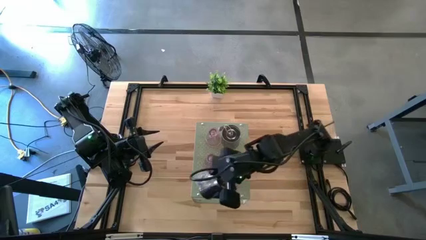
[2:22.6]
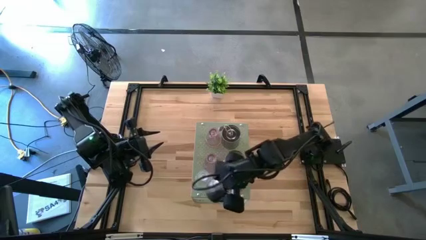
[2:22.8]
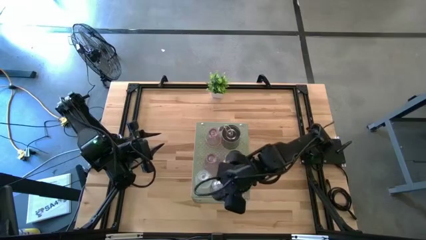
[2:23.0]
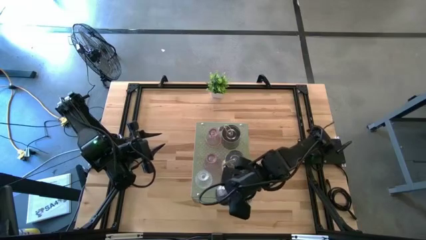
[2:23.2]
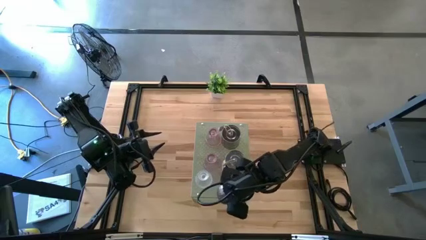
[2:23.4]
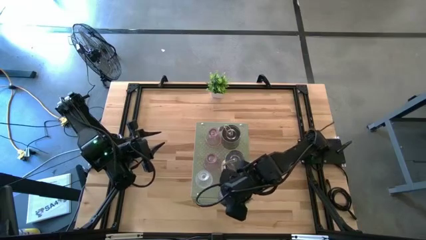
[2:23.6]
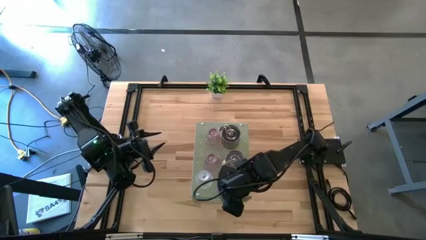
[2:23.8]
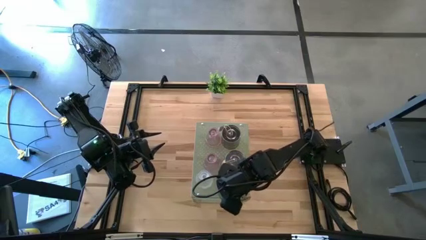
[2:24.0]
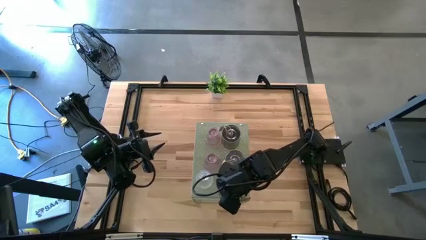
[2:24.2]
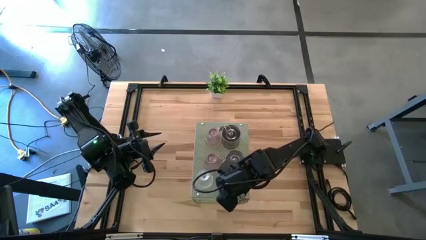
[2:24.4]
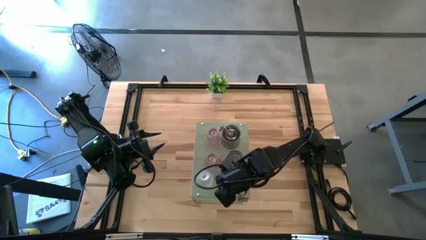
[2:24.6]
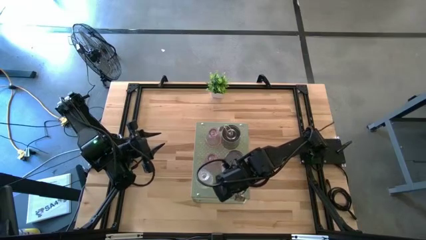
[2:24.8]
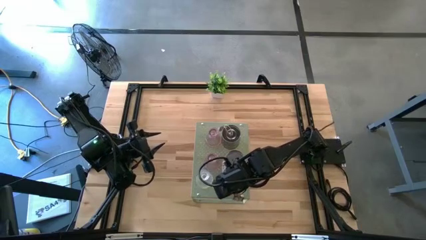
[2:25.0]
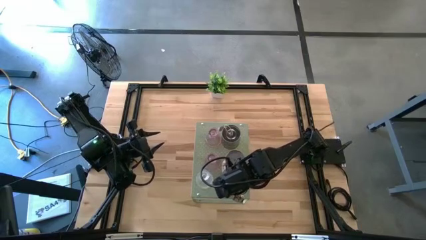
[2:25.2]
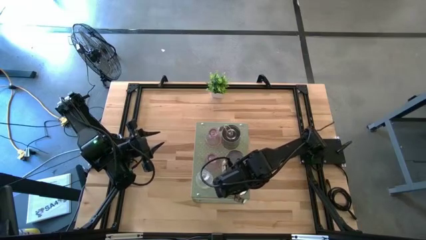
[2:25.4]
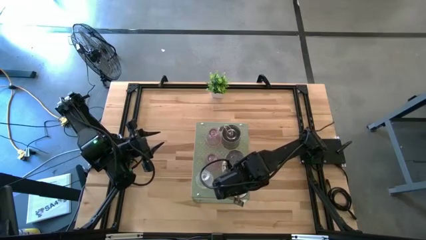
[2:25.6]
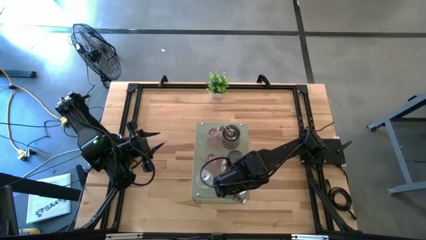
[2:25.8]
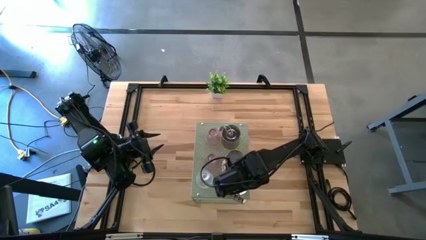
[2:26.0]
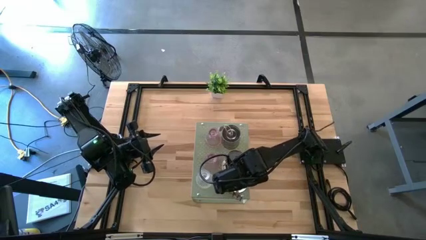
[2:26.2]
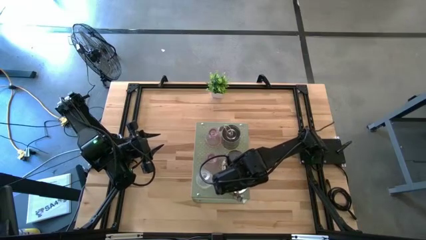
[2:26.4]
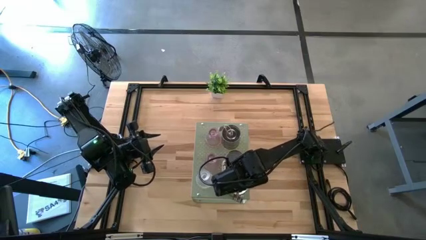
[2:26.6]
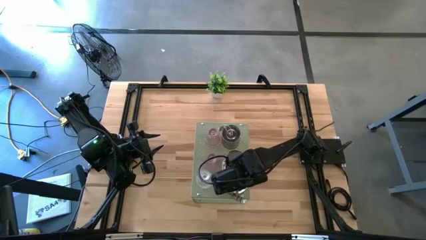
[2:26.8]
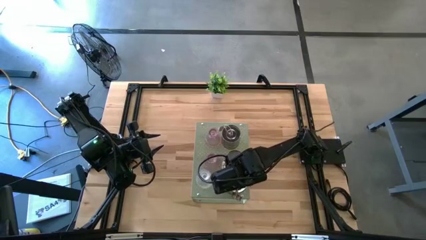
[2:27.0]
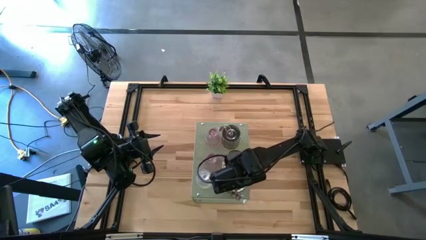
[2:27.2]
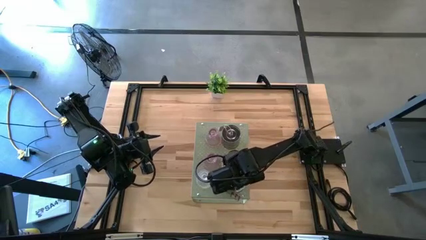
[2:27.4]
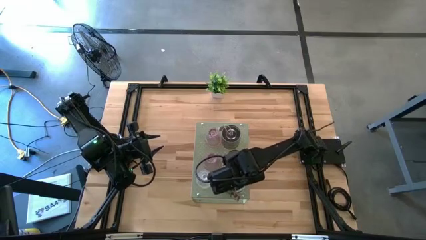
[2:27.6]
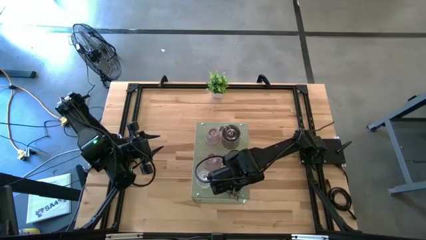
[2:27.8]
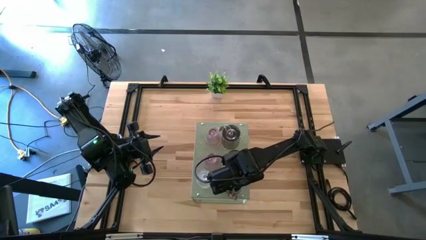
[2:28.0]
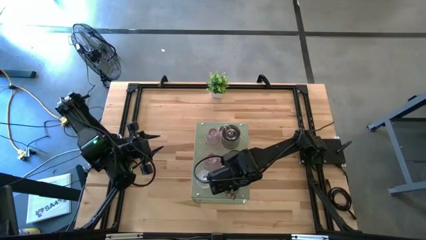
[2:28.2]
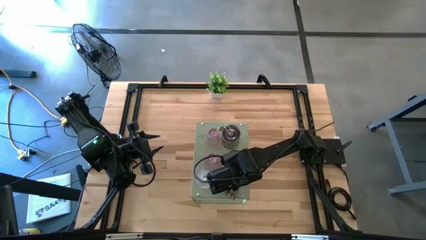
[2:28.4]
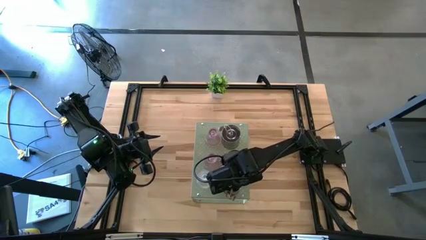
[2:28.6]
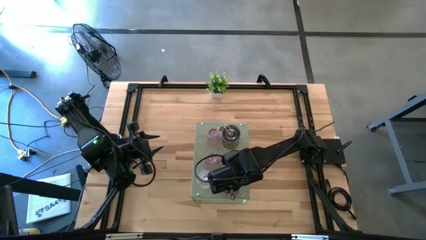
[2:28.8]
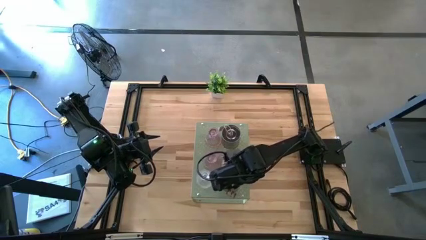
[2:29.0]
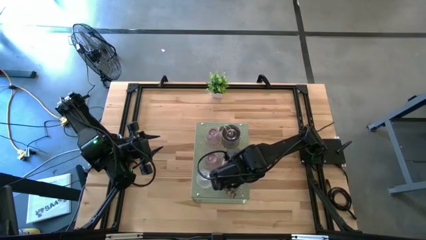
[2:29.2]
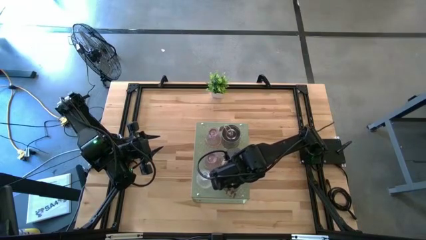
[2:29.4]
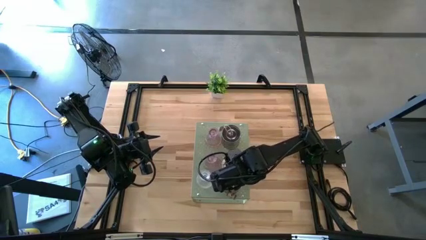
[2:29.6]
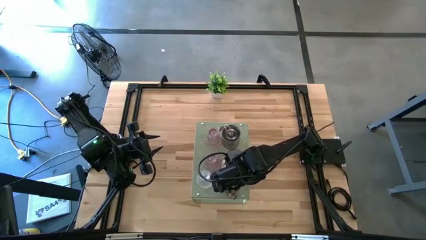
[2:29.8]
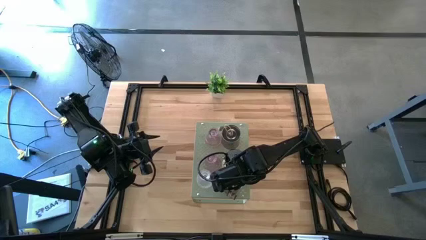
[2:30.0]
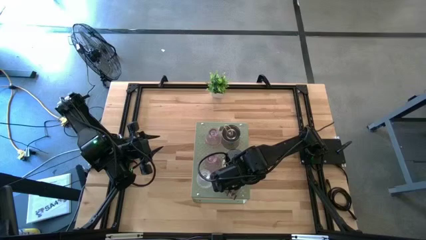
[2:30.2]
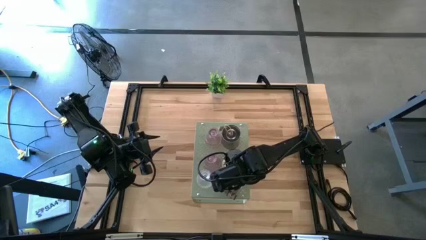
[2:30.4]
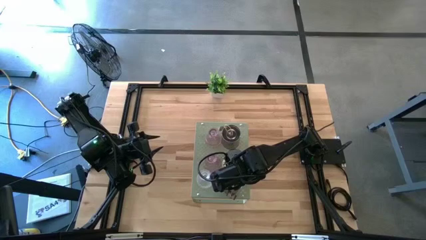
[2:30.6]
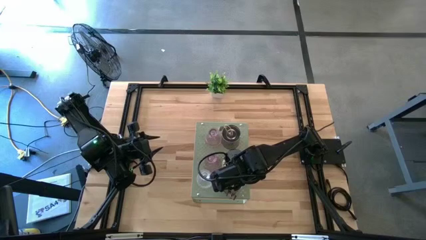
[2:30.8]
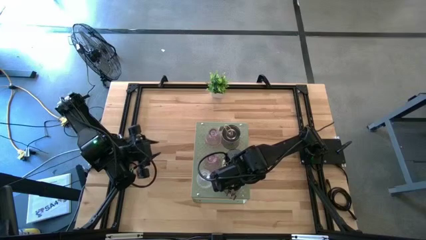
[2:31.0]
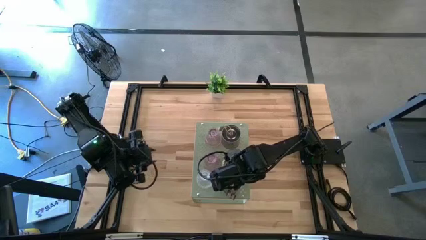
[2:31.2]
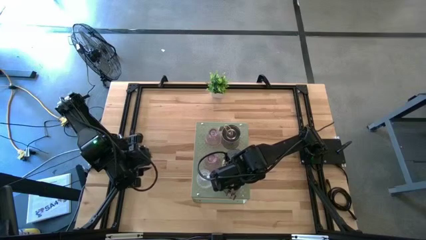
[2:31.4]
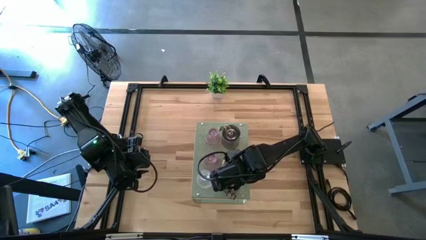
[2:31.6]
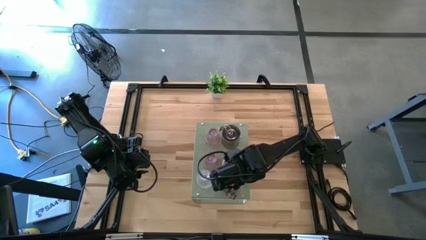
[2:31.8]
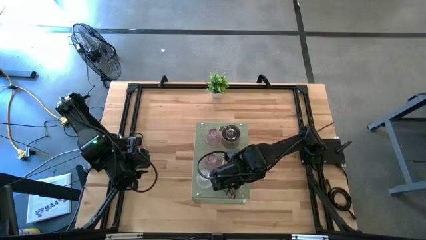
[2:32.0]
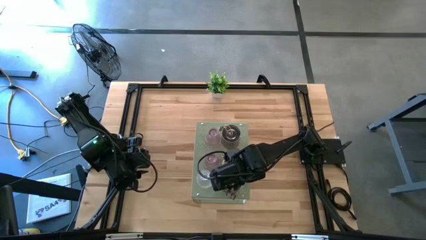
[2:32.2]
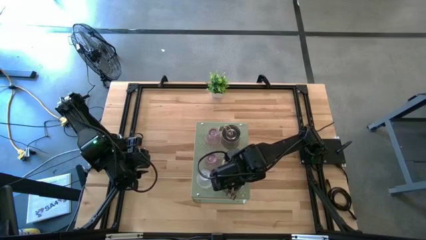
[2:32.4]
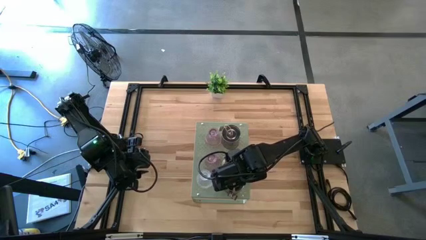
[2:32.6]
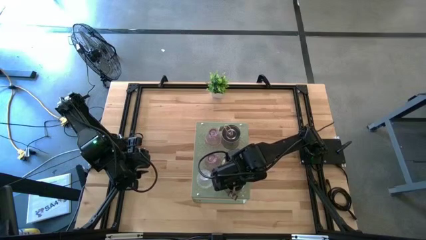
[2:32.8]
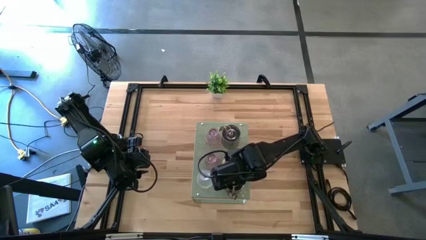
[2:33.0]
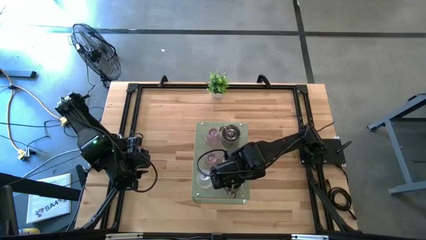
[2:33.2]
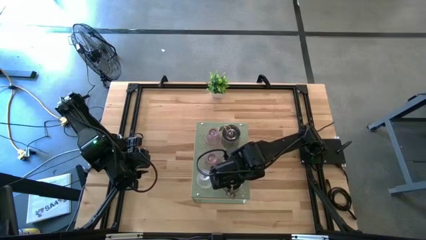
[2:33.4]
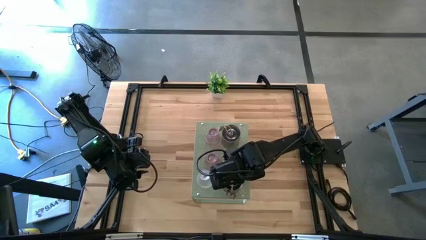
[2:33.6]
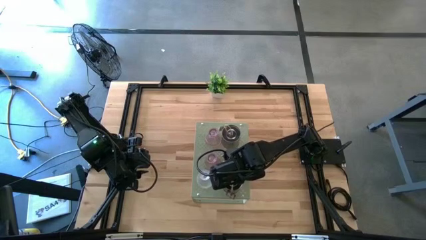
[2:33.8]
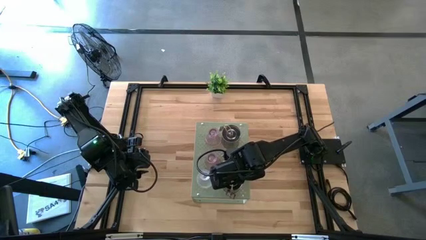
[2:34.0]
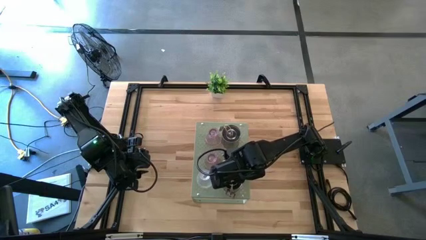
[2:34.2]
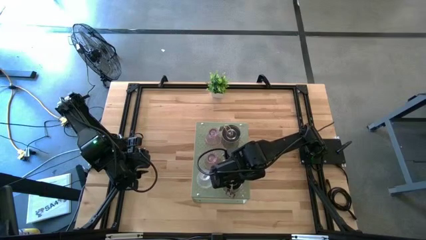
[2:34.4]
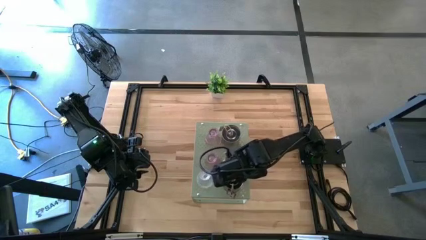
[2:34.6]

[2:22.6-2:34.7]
Task: Pick & Place candle stick holders
Put the silver scented candle on the shelf

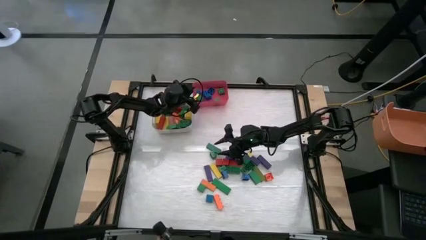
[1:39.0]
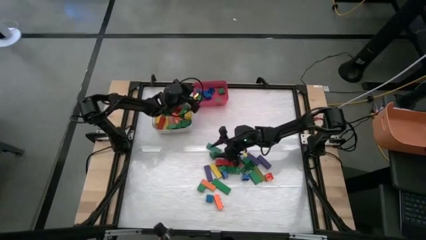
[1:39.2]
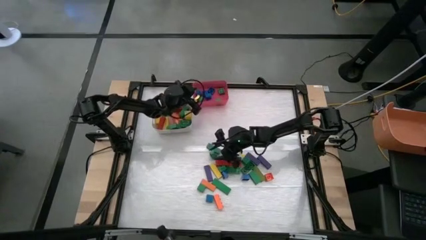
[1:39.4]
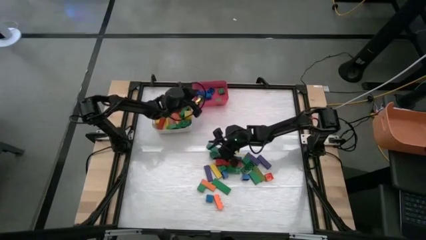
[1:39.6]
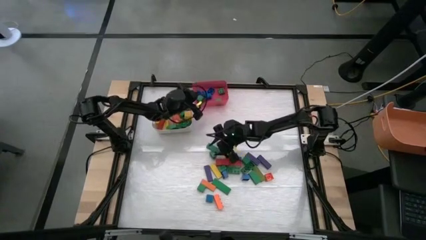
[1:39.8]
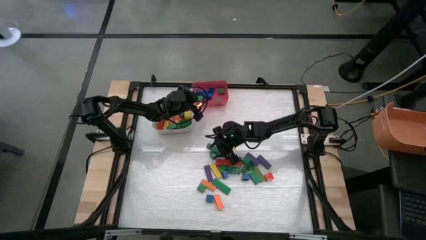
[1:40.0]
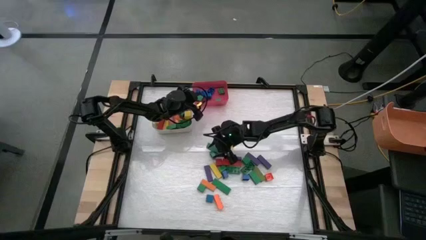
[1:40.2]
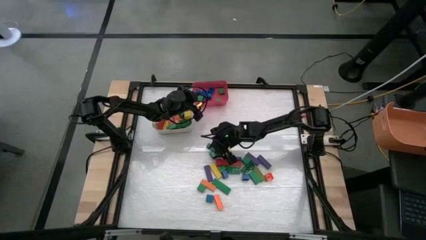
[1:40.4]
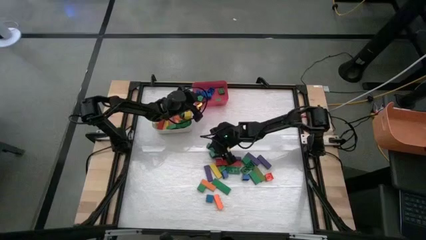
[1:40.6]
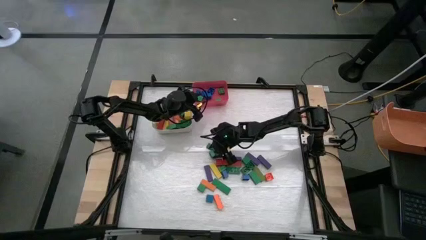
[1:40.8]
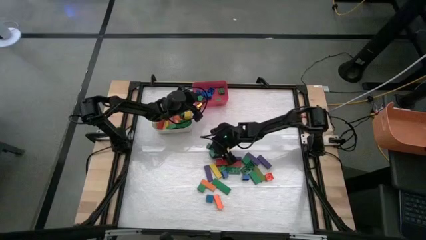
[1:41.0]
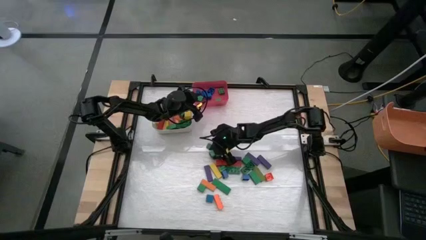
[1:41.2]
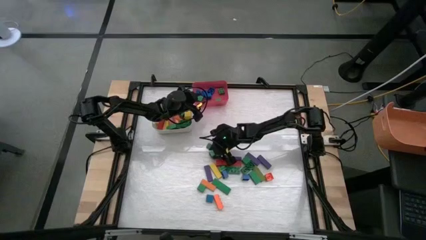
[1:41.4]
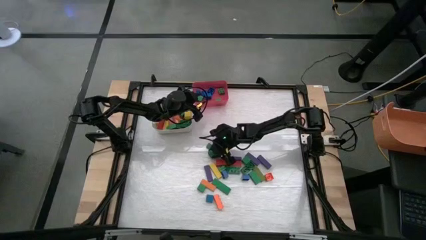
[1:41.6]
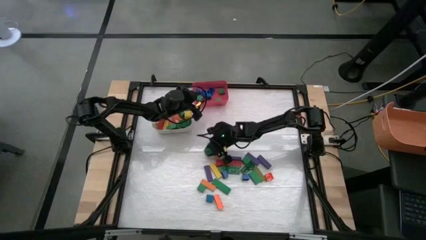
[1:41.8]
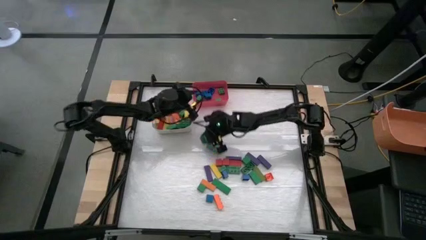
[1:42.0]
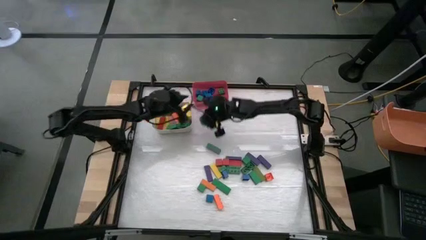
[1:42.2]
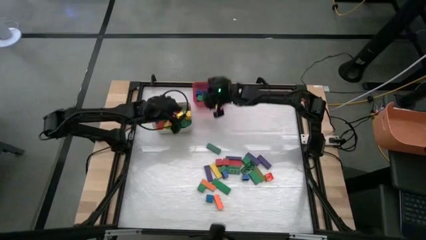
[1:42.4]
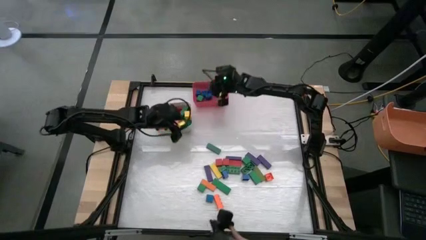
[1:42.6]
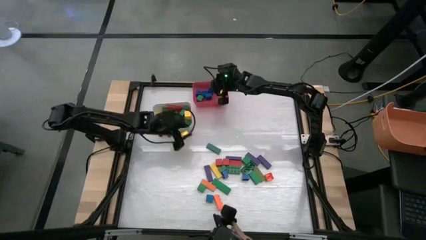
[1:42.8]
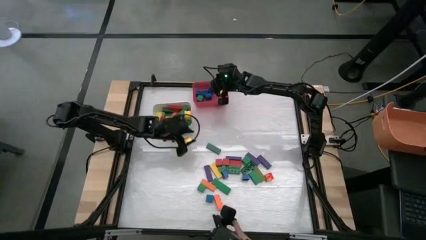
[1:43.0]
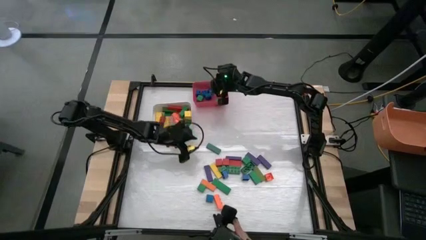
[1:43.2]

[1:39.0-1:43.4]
Task: Sort blocks by size
Put the small green game piece into the red bin
